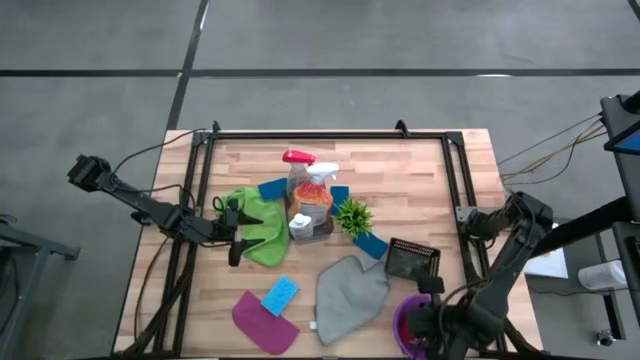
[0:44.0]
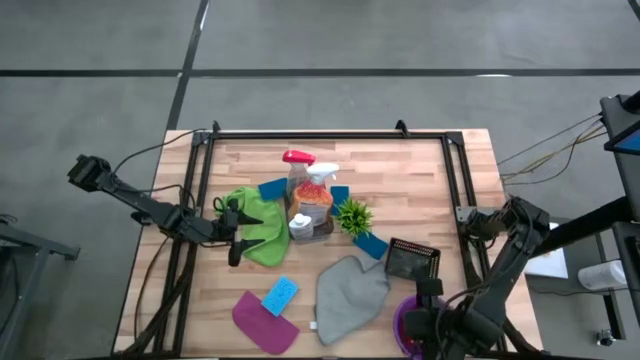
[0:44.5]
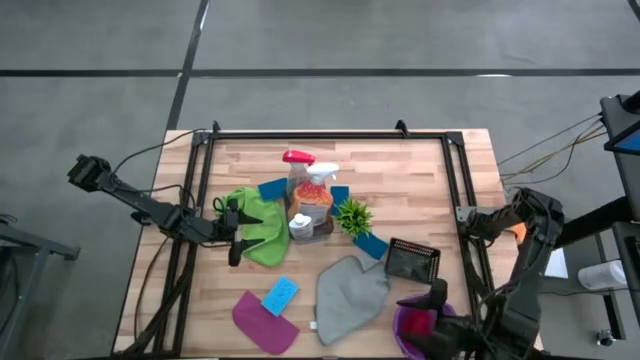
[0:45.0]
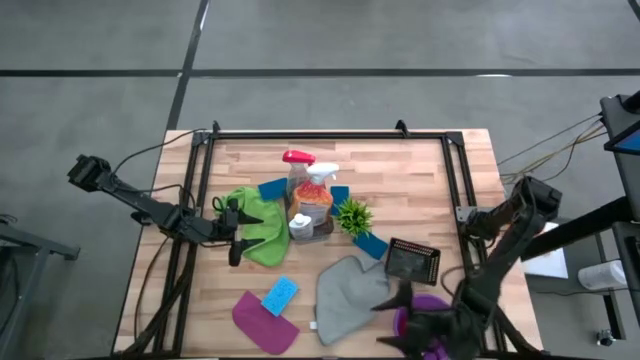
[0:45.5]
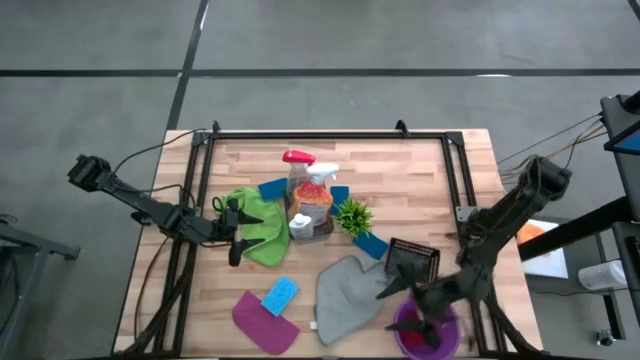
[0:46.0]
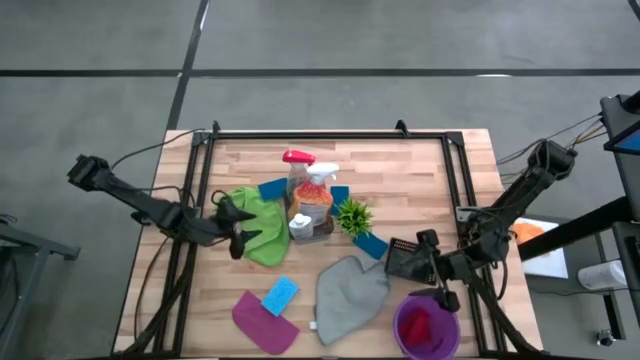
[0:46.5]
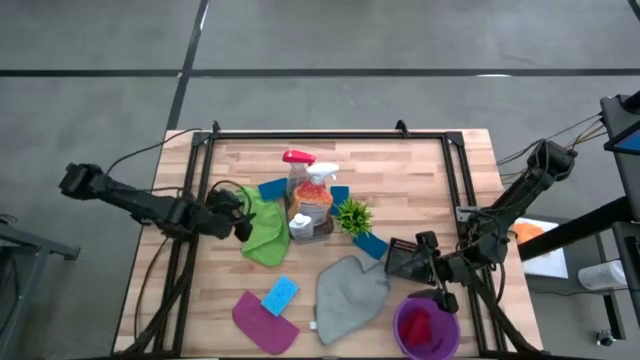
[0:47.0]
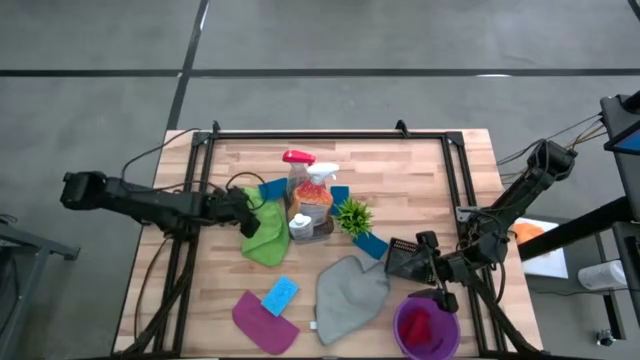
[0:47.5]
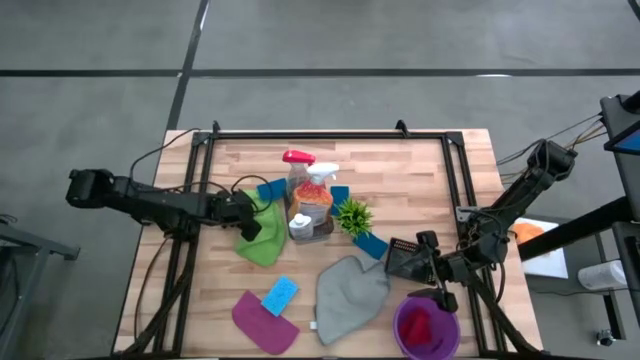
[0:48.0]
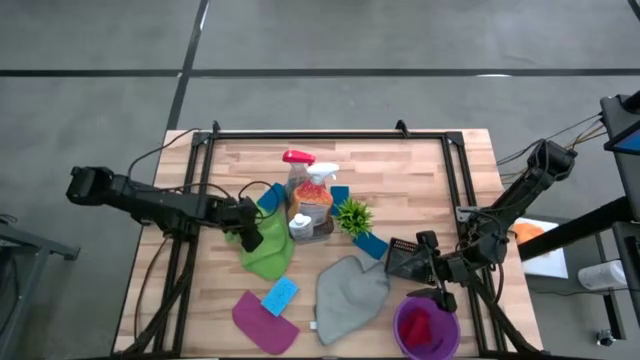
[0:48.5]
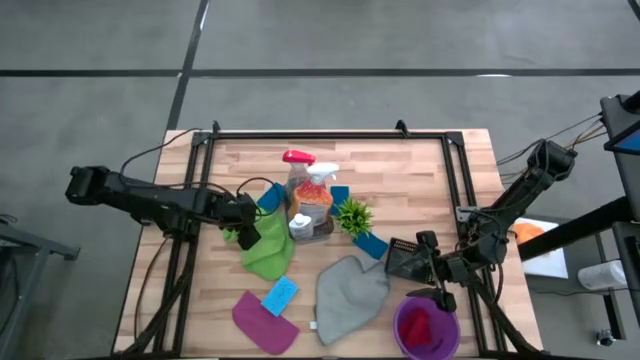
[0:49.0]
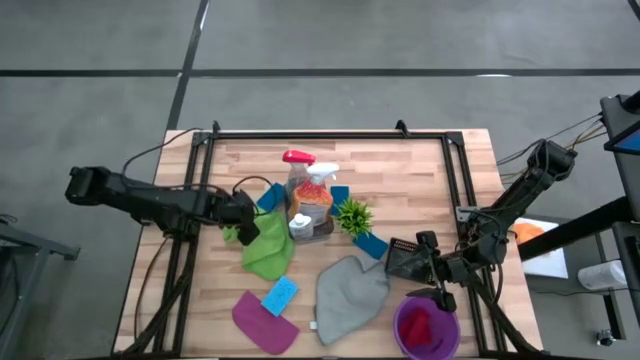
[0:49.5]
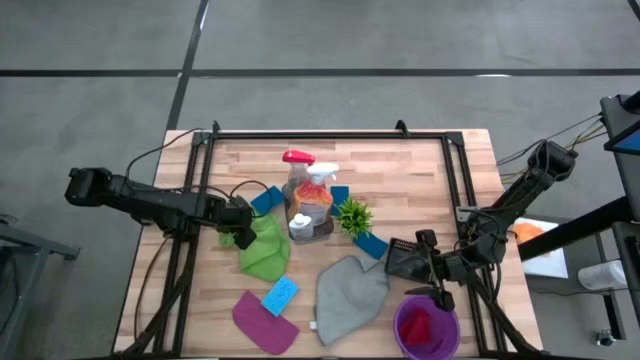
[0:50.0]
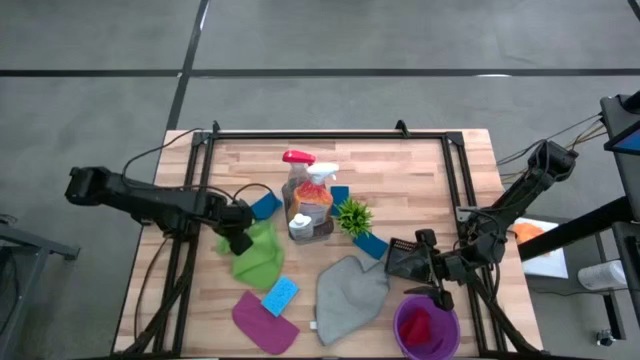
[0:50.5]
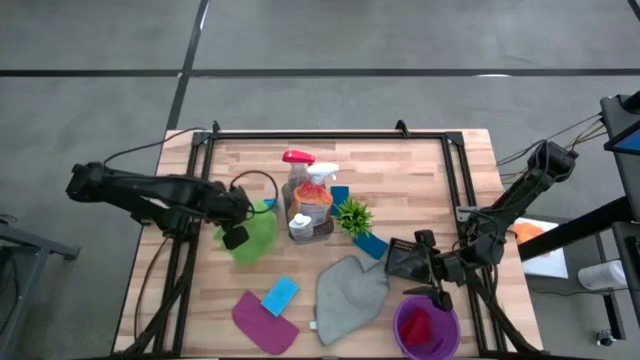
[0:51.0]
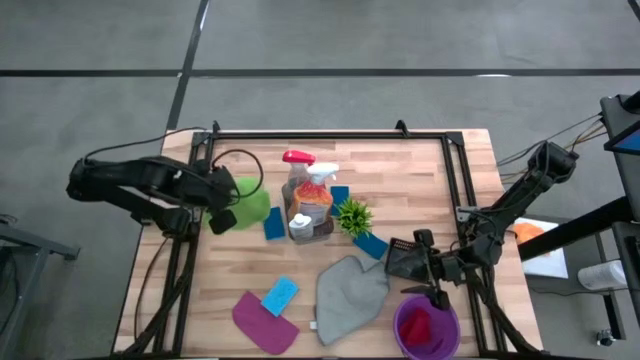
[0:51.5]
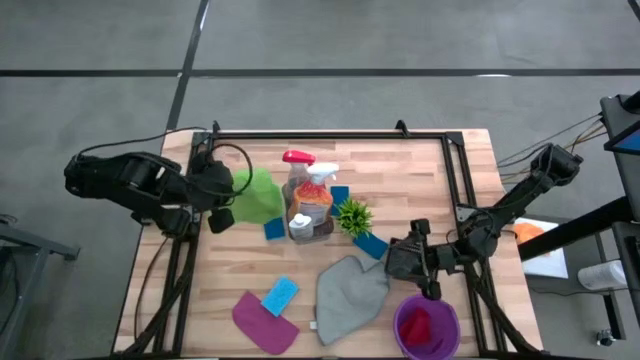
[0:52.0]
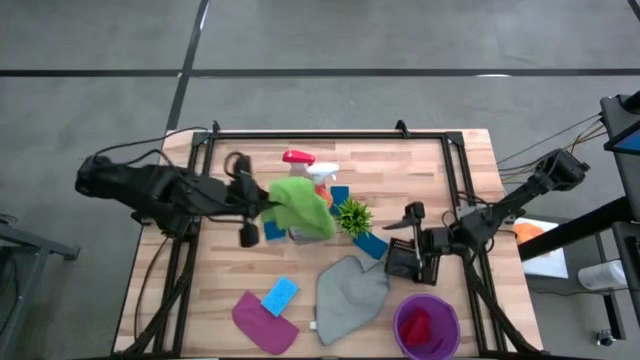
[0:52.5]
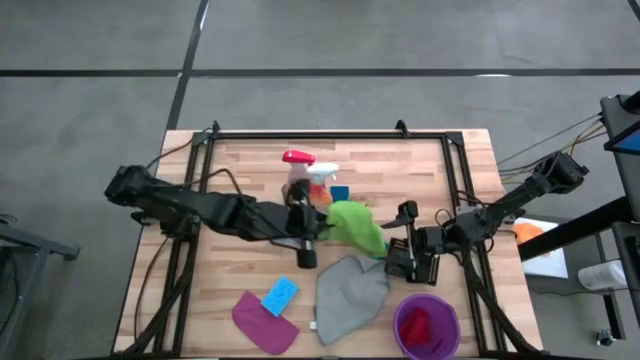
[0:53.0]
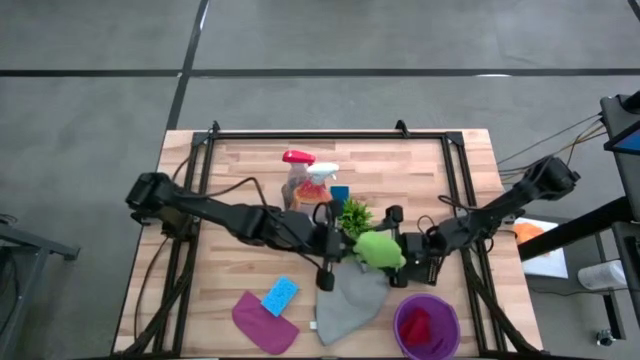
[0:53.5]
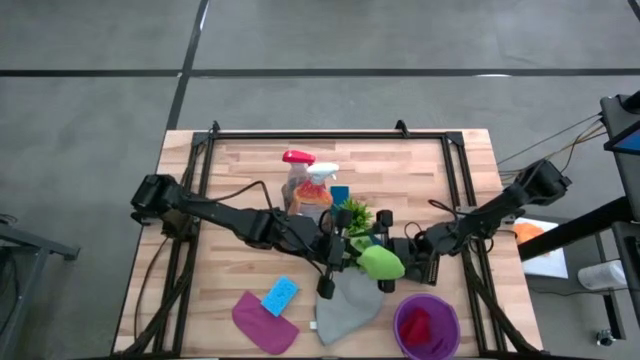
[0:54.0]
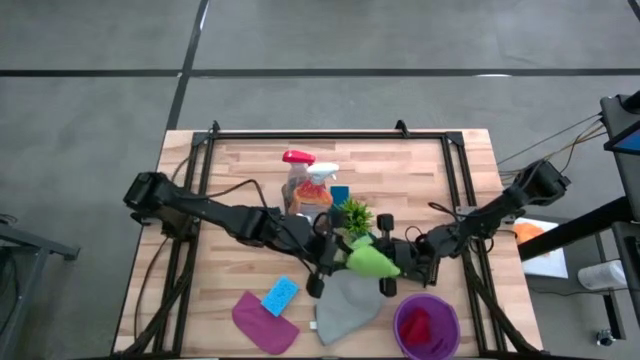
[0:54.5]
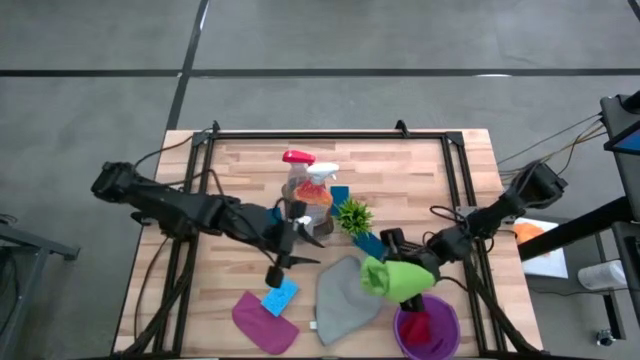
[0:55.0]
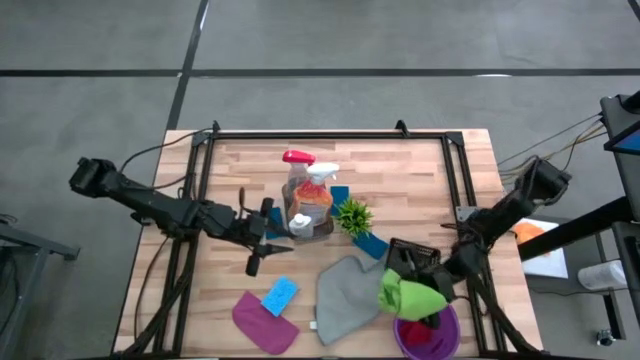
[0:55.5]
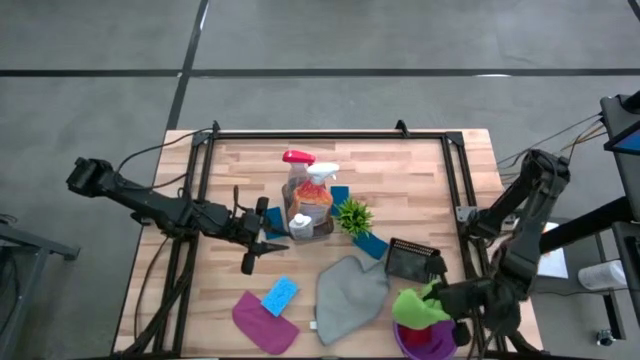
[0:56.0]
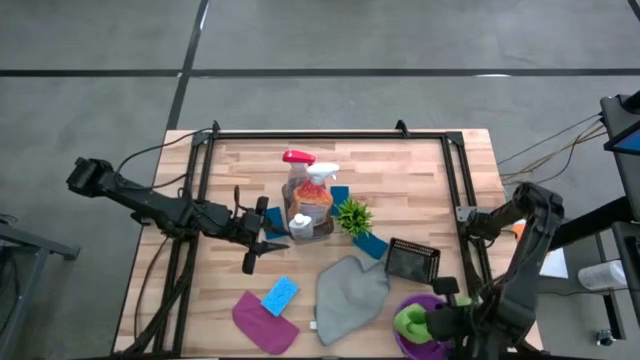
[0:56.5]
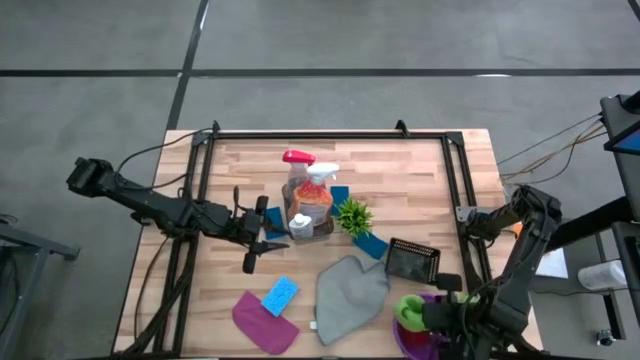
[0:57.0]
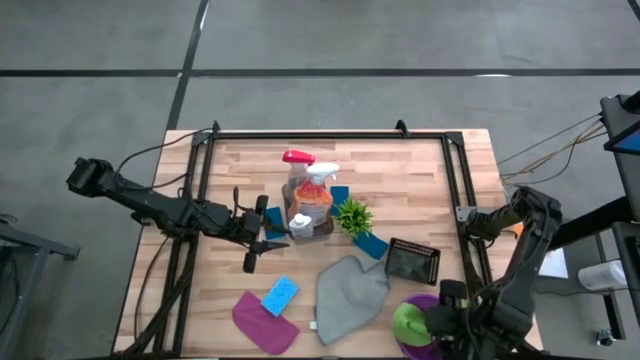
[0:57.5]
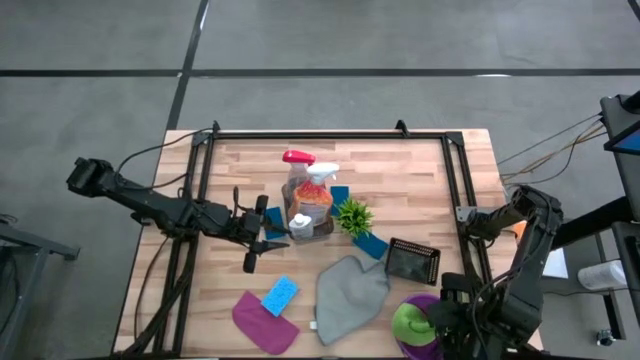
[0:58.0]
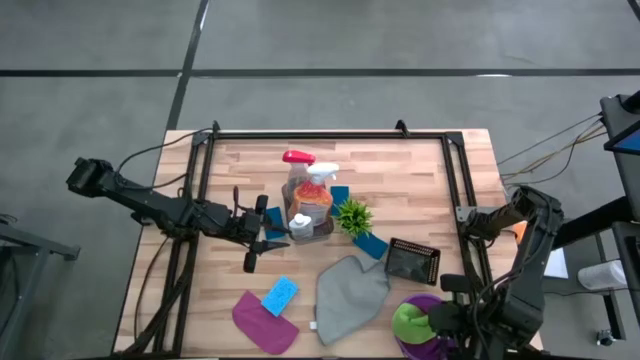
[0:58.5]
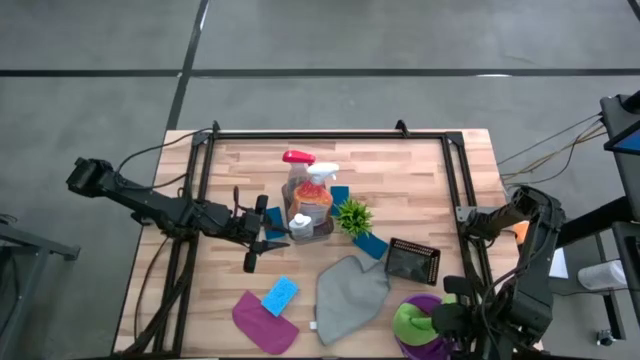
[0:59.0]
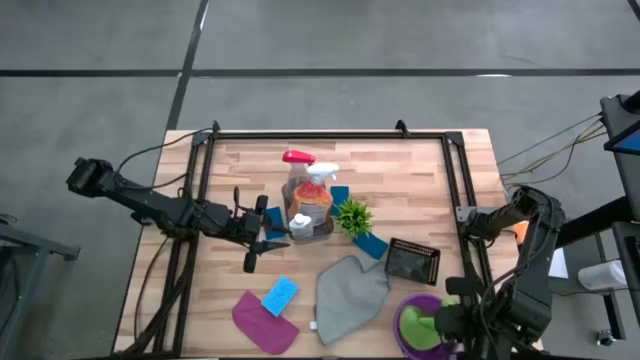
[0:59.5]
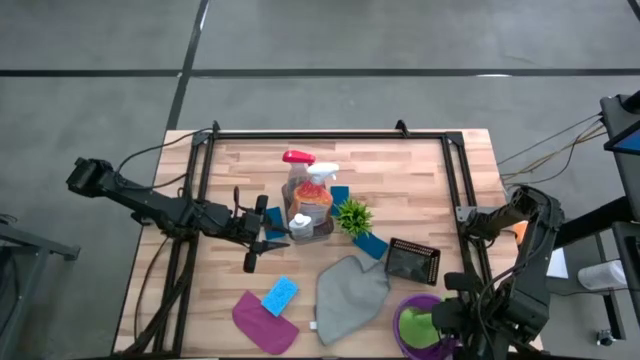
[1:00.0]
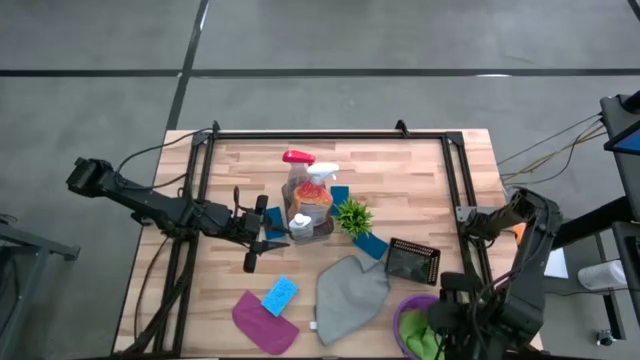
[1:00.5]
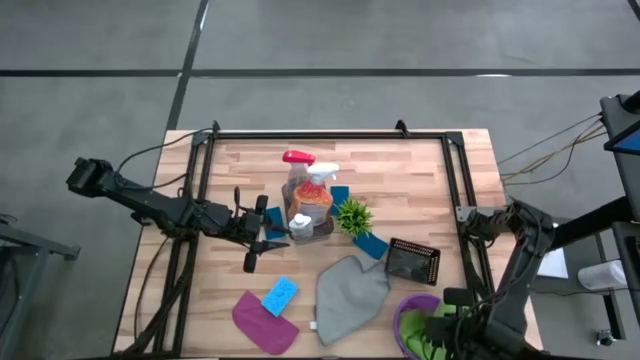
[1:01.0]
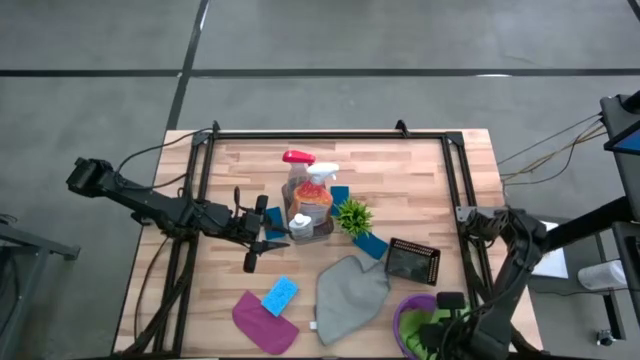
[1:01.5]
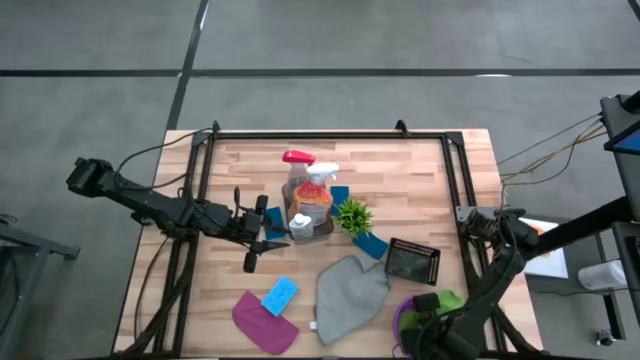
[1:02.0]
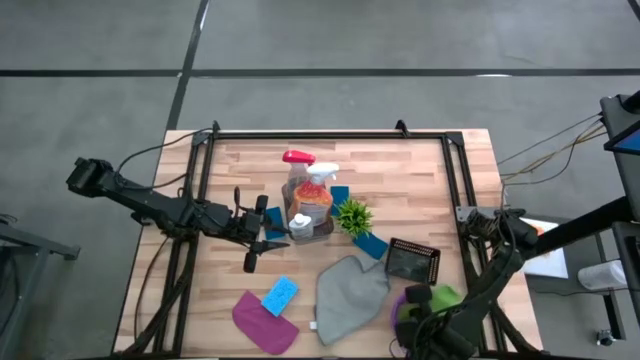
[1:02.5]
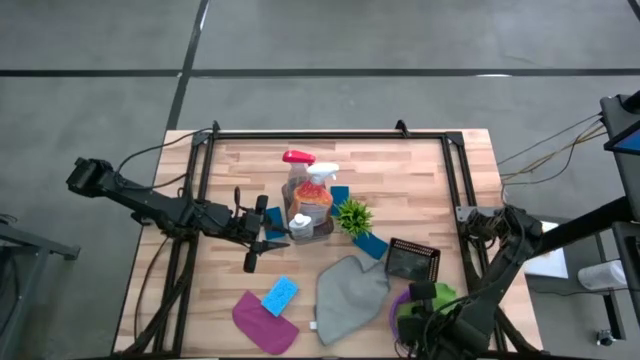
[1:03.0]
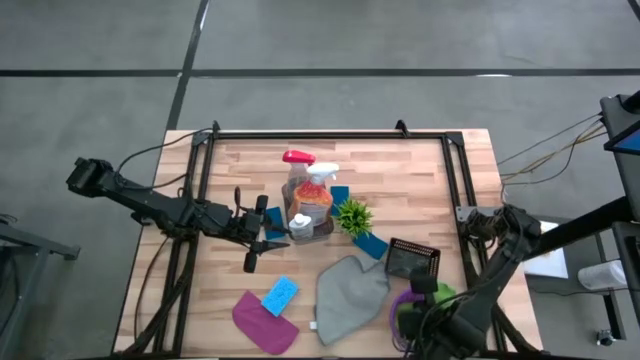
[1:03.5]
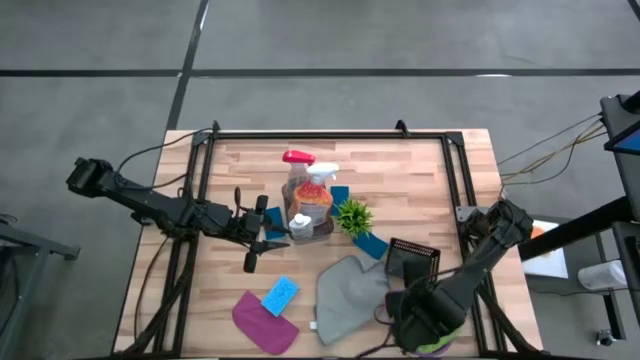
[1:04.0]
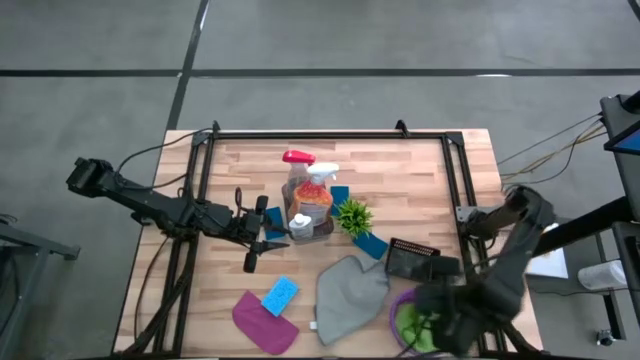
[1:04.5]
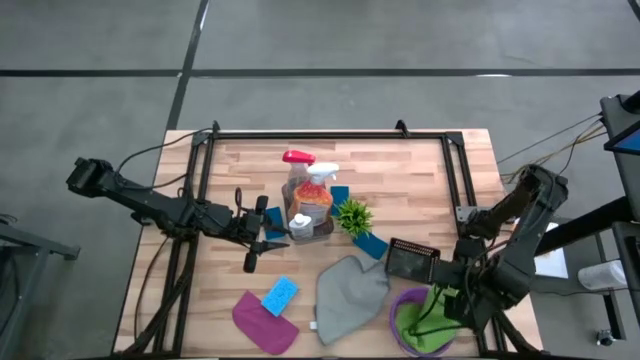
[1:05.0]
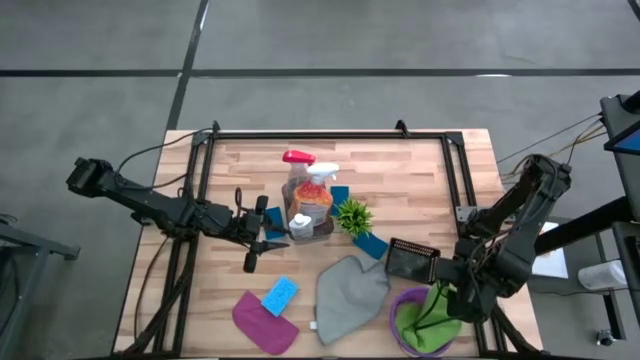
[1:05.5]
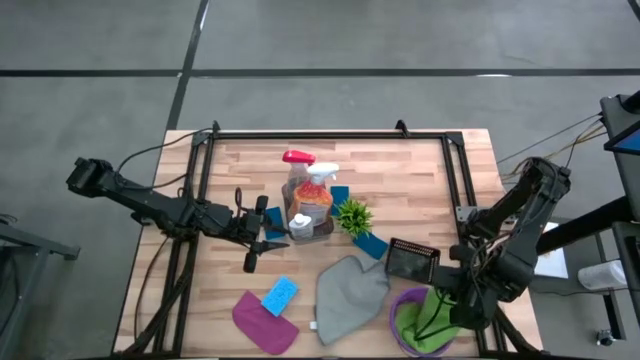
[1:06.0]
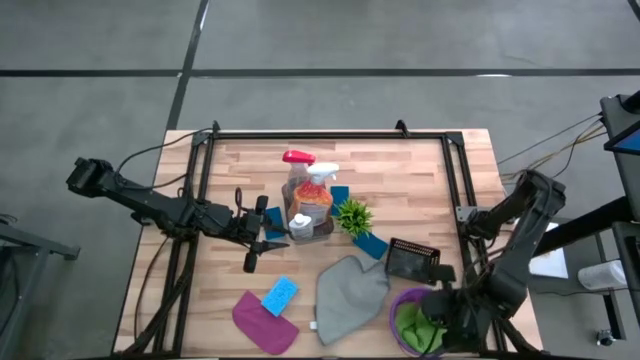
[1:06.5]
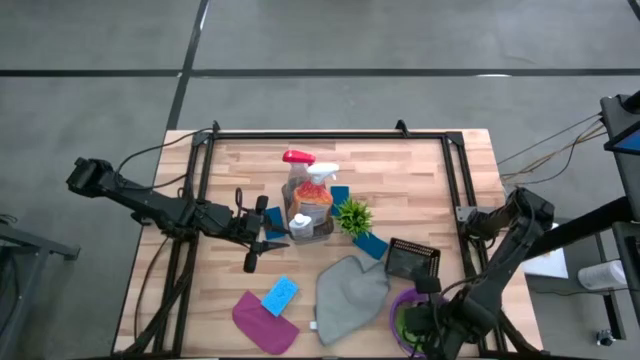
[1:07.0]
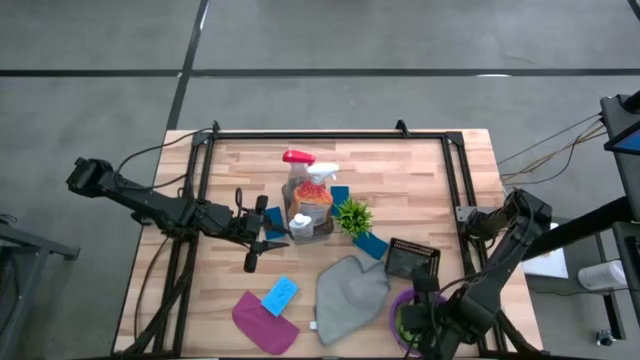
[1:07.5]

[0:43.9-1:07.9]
Task: Pick & Place Kitchen Items
Put the green towel into the purple bucket
